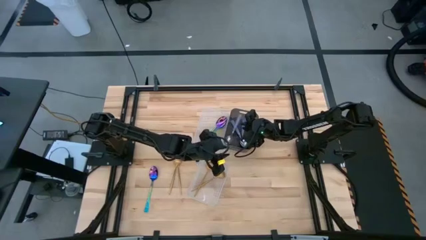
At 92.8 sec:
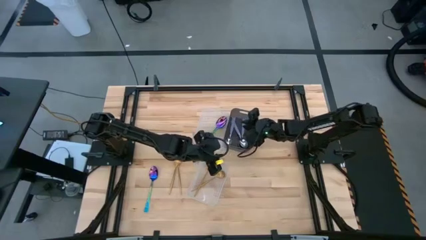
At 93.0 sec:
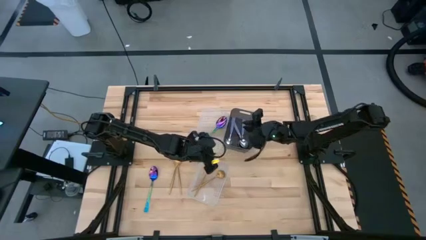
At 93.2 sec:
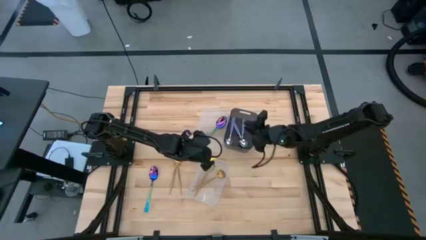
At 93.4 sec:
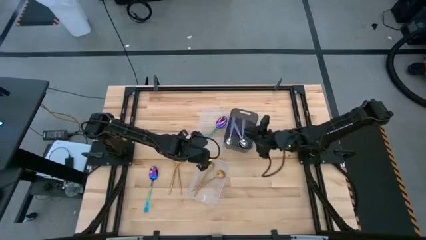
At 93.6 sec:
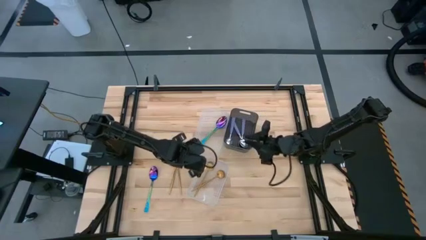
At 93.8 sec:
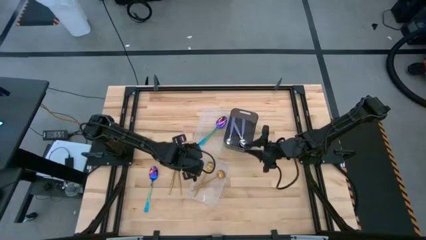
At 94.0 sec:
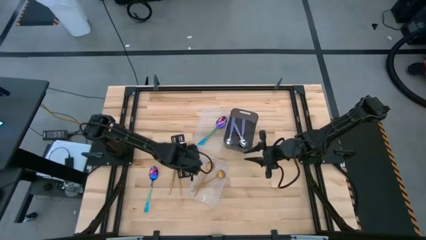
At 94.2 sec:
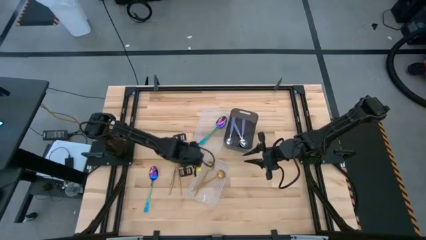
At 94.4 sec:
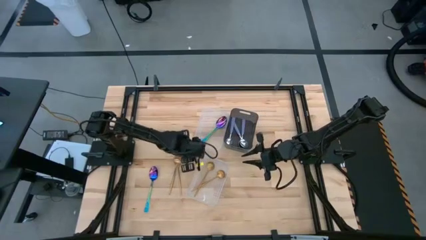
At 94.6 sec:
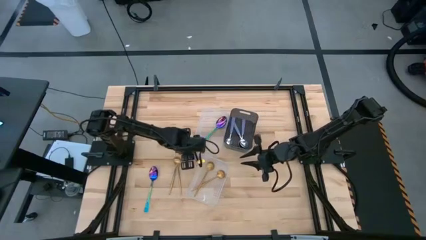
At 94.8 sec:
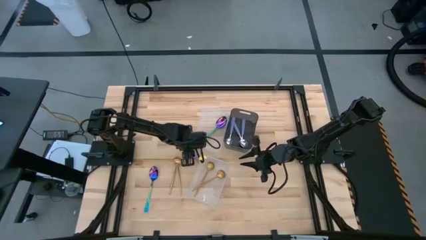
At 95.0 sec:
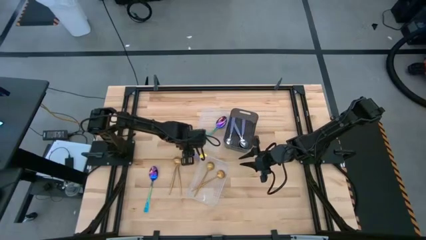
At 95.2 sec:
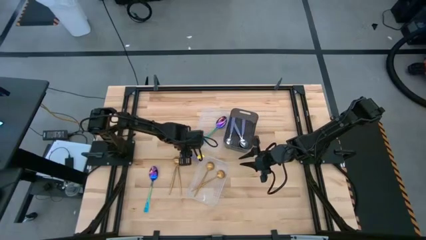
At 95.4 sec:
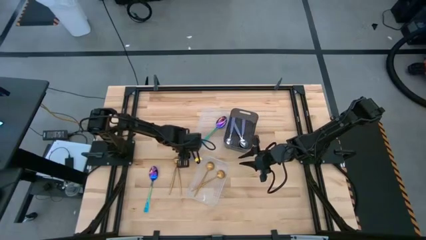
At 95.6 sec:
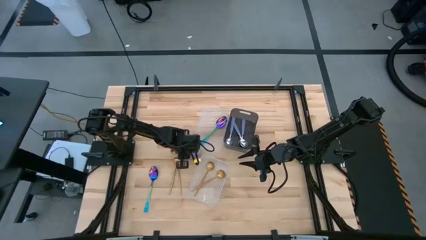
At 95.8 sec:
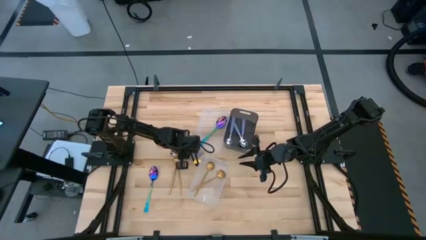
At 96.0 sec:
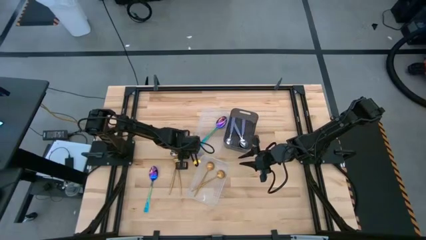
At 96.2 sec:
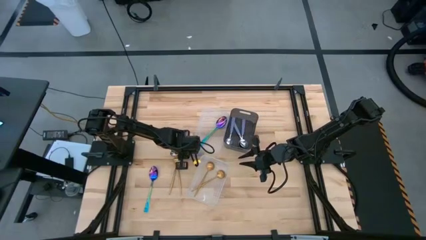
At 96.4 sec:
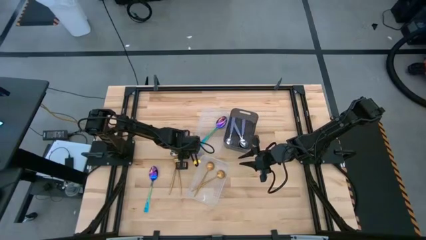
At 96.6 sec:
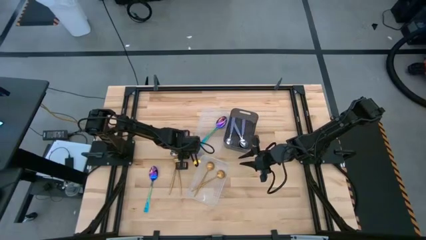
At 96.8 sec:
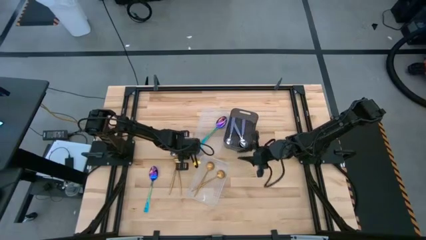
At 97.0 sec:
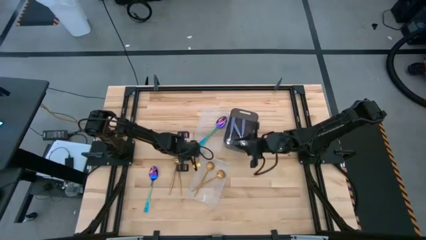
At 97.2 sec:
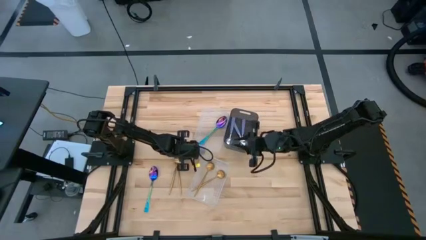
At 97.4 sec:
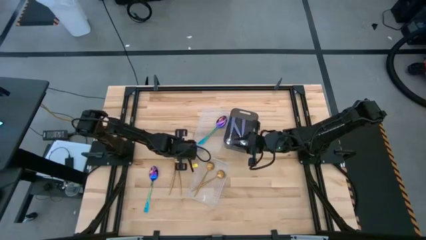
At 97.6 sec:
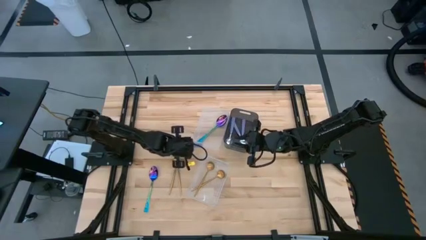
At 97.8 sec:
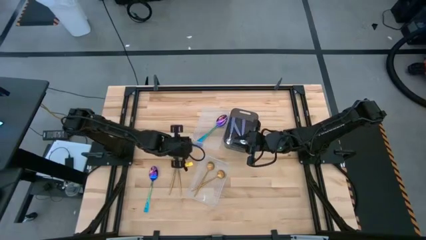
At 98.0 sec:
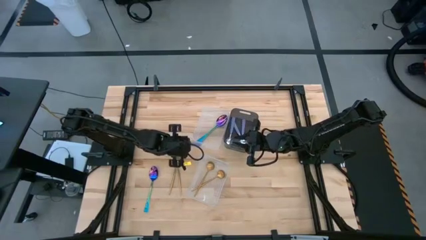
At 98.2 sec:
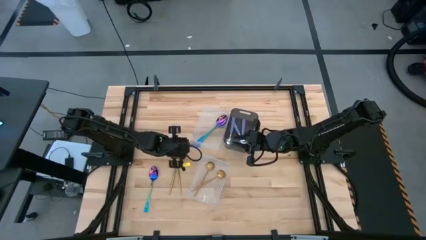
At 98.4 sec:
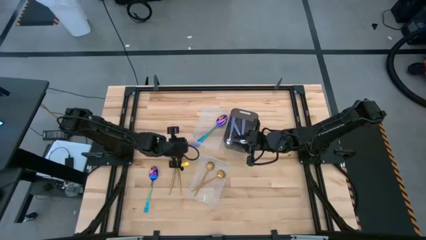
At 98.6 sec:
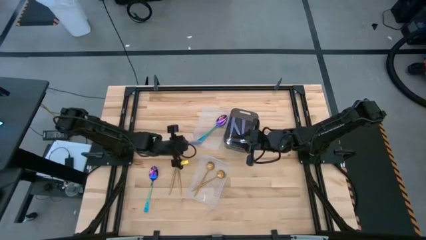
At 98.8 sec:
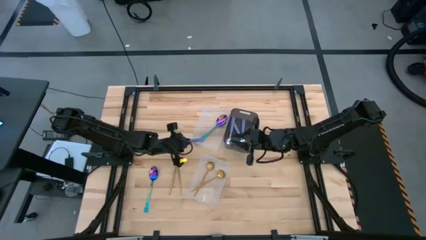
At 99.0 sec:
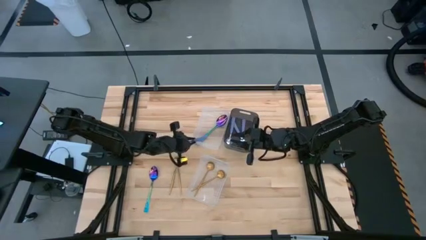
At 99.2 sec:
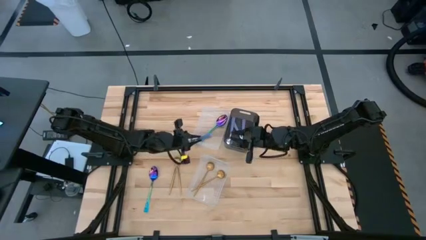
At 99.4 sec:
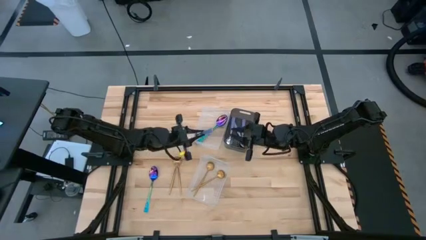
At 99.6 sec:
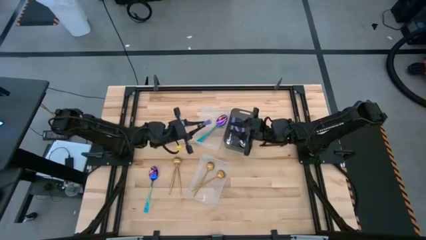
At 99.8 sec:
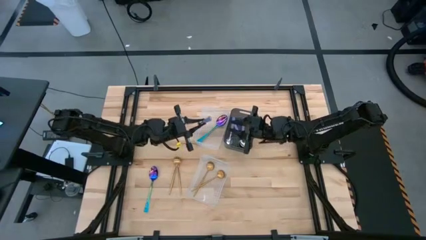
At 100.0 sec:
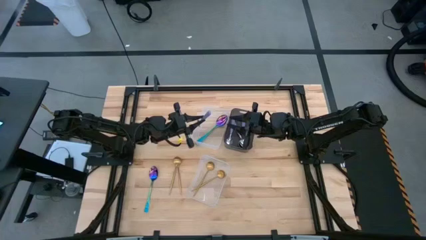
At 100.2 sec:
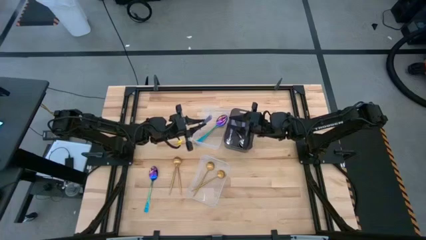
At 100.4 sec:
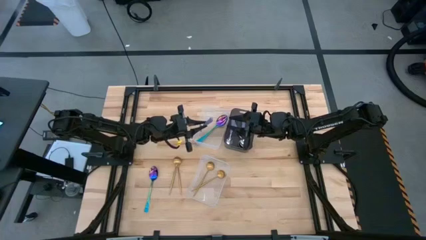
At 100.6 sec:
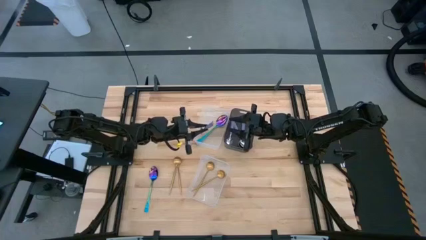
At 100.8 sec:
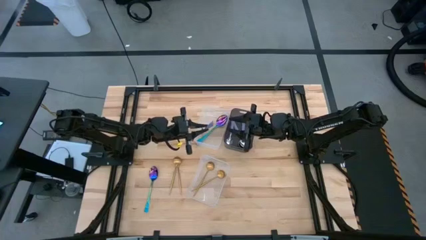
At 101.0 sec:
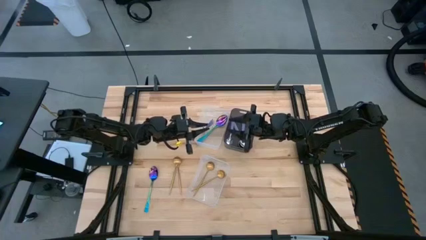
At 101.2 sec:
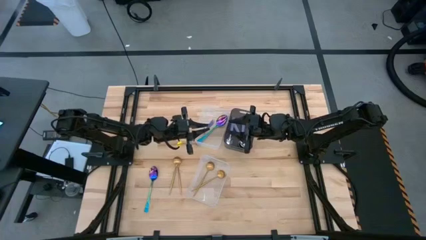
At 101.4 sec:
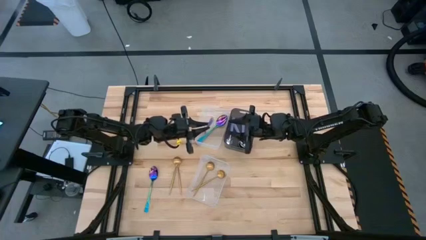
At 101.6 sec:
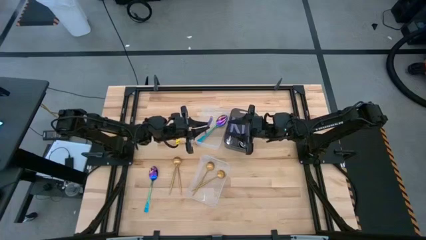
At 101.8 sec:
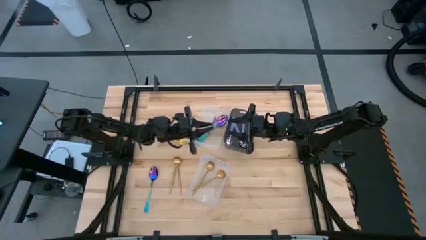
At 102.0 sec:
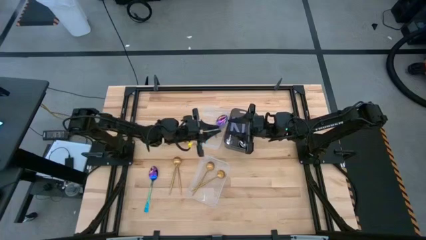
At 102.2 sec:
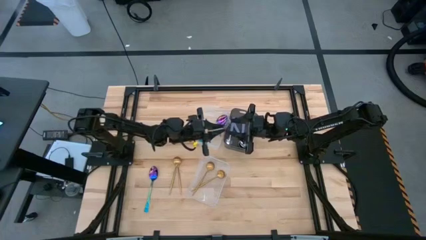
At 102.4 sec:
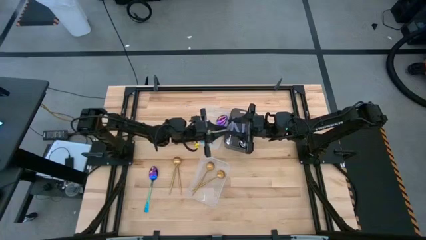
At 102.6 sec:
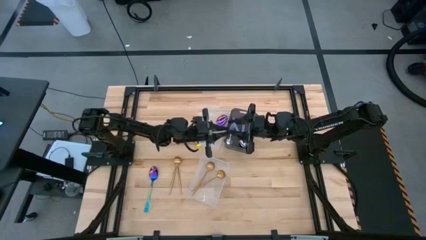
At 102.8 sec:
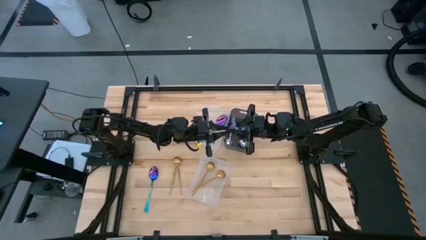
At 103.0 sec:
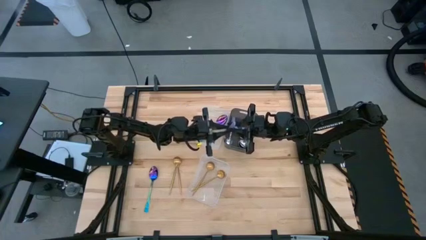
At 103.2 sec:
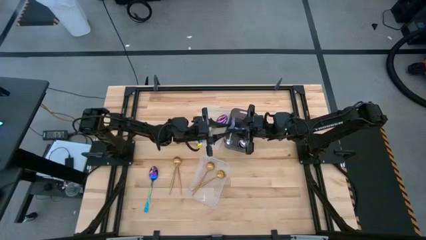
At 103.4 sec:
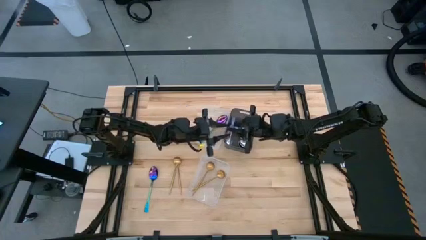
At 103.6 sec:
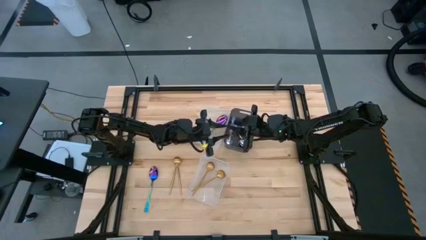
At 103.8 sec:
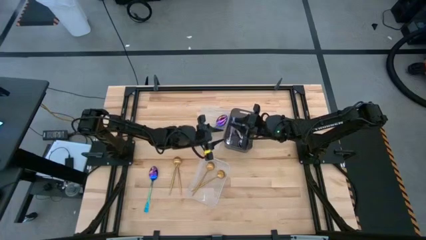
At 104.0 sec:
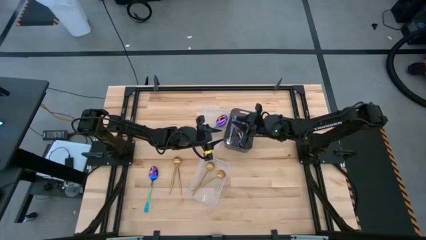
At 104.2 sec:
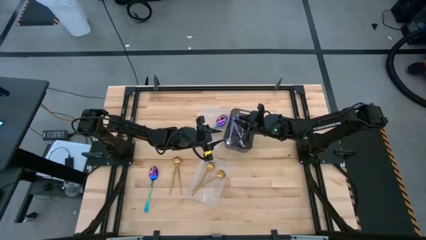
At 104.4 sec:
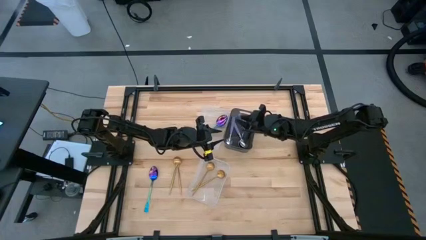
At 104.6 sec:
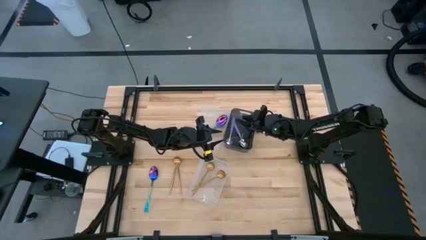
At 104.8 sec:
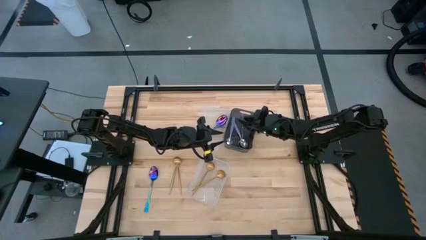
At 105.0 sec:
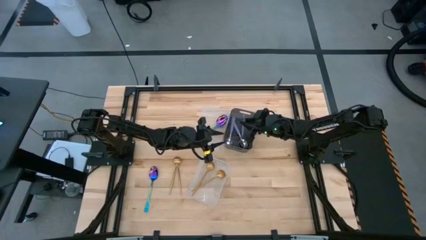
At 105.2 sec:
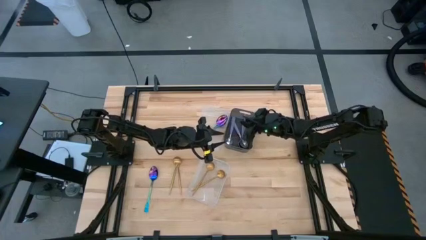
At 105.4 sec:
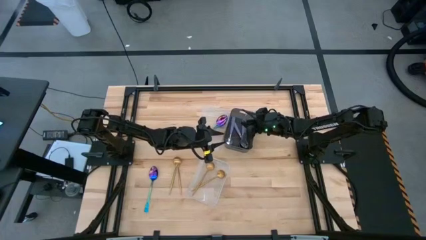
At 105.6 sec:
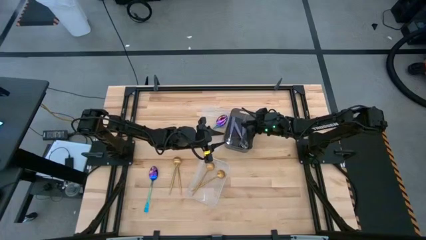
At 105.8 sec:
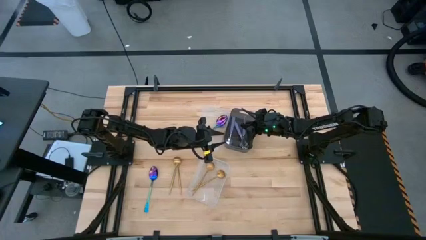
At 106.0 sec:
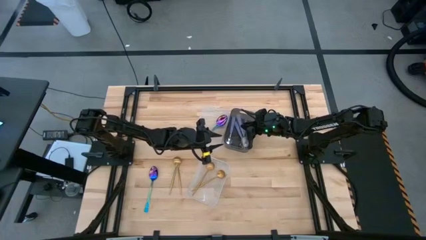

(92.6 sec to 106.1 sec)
Task: Sort silverware by color (type)
Put the purple spoon into the black bin

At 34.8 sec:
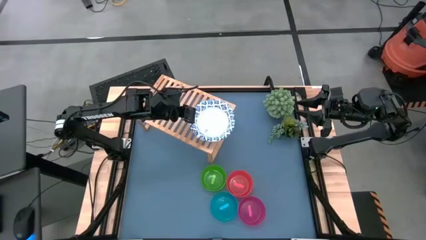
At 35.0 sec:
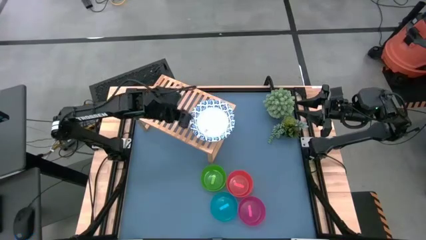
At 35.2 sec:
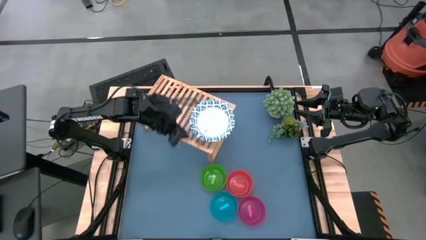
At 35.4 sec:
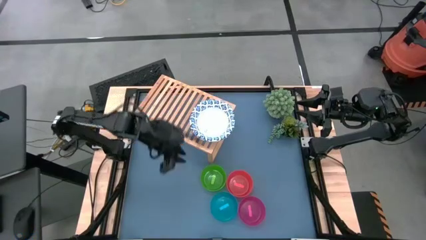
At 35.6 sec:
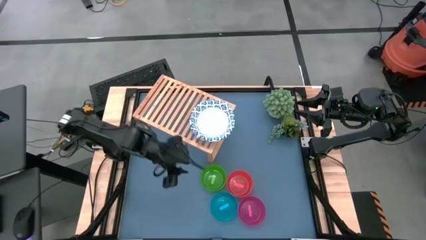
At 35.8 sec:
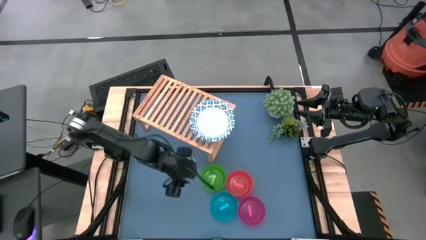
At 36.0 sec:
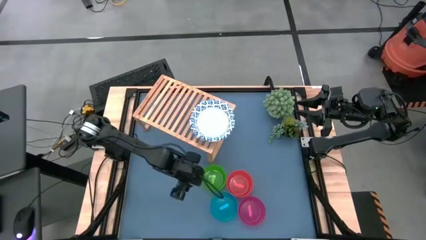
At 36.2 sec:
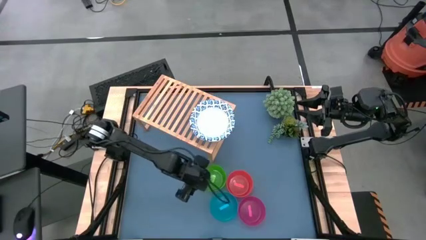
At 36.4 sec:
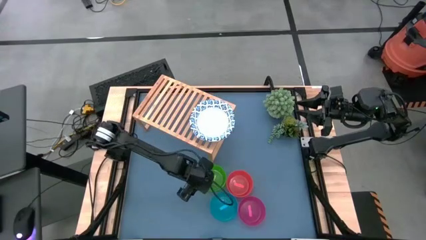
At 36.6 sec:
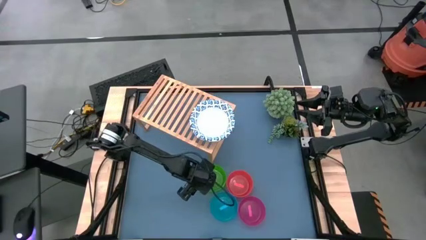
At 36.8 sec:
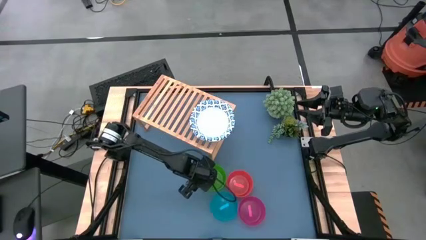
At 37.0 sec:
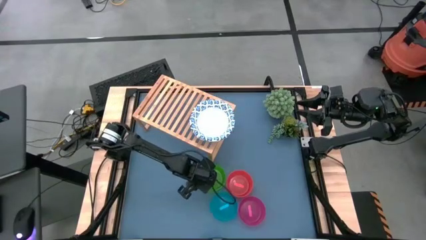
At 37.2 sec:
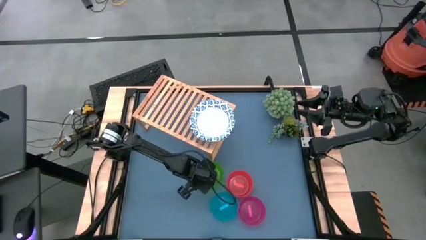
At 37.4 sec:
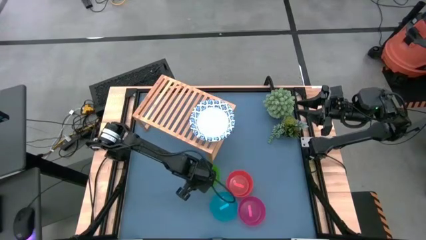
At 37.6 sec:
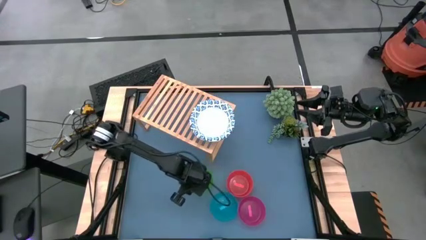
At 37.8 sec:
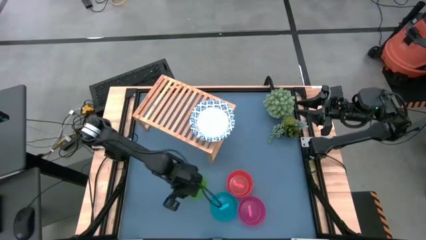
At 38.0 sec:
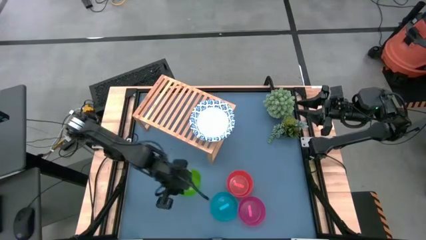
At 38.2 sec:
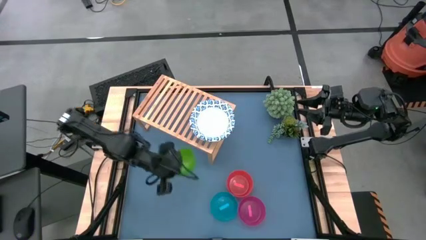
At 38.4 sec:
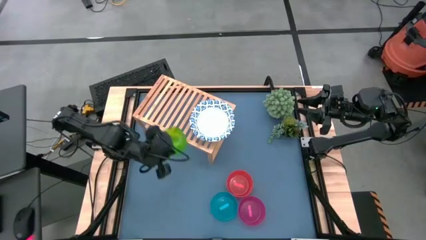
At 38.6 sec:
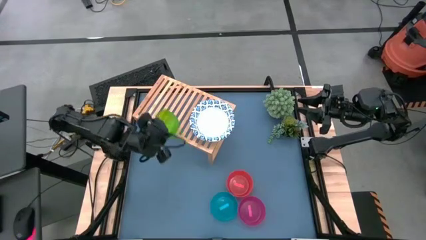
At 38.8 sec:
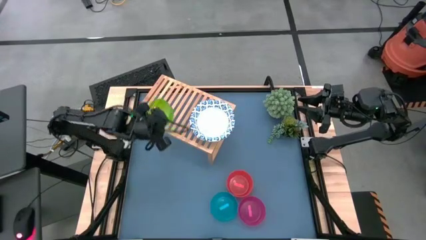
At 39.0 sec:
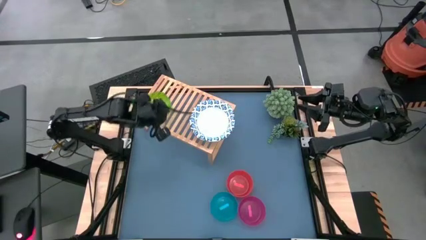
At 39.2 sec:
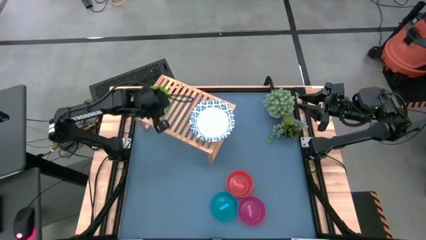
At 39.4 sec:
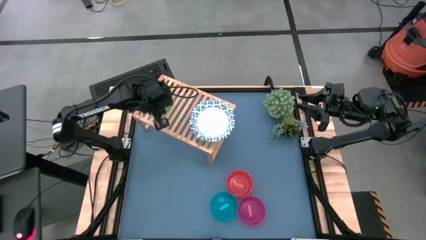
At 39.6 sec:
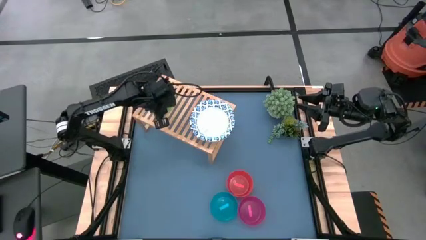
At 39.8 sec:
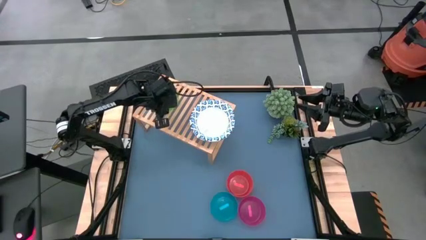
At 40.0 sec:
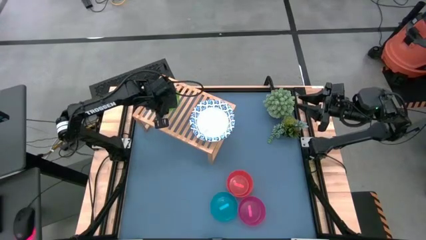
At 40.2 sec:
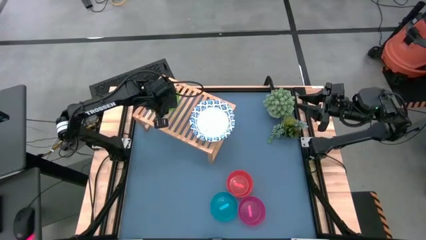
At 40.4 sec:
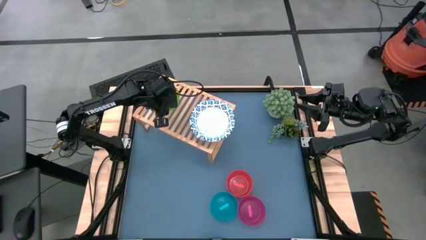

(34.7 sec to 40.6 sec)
Task: Place and stack bowls onto a shelf
Put the green bowl on the shelf
